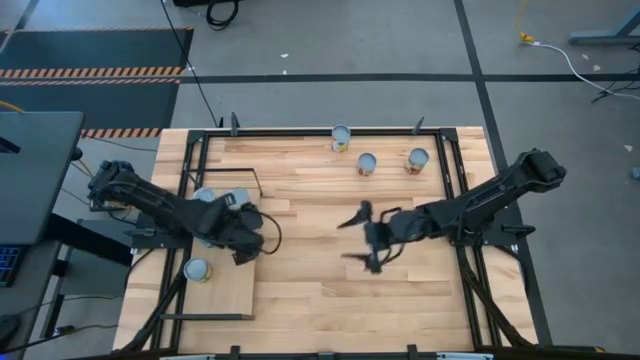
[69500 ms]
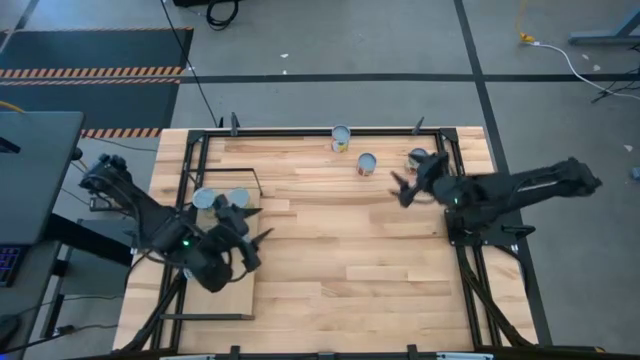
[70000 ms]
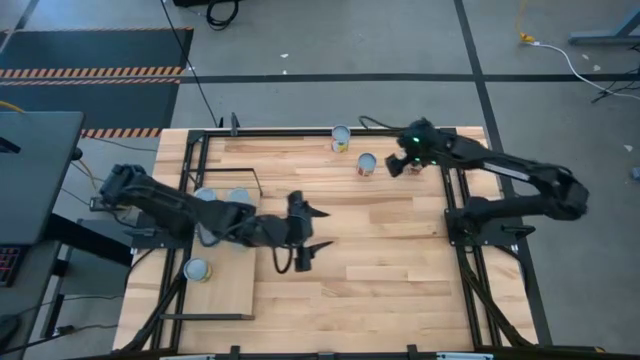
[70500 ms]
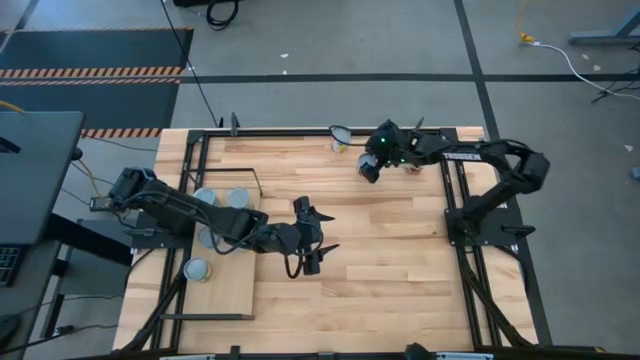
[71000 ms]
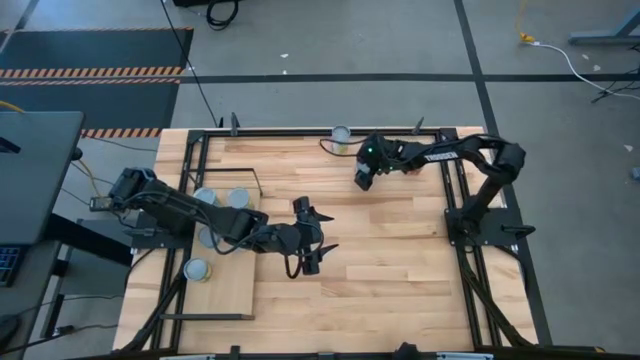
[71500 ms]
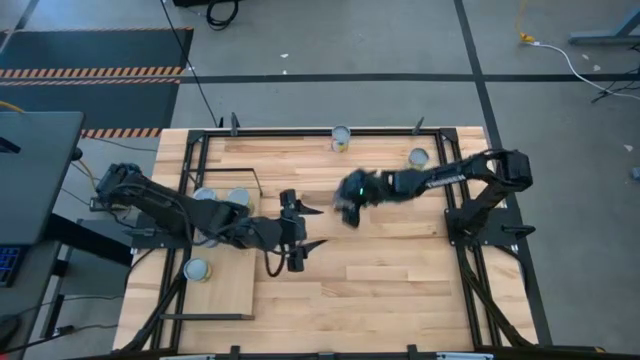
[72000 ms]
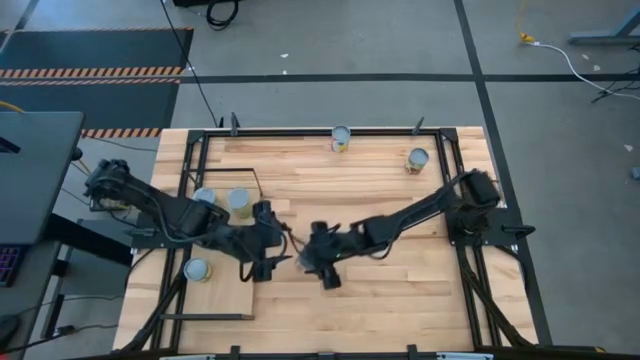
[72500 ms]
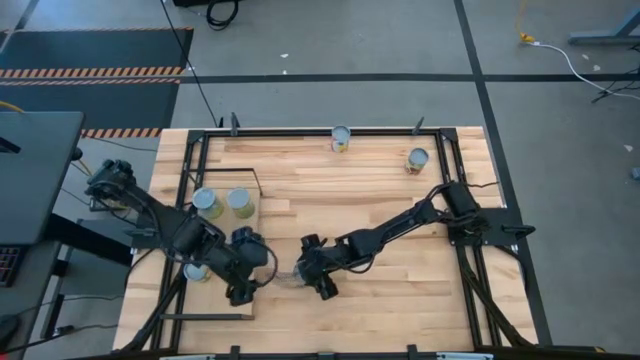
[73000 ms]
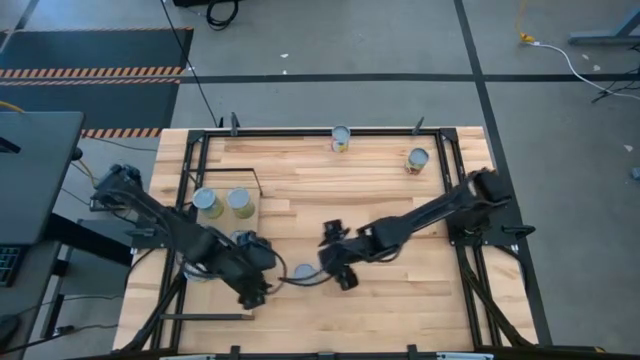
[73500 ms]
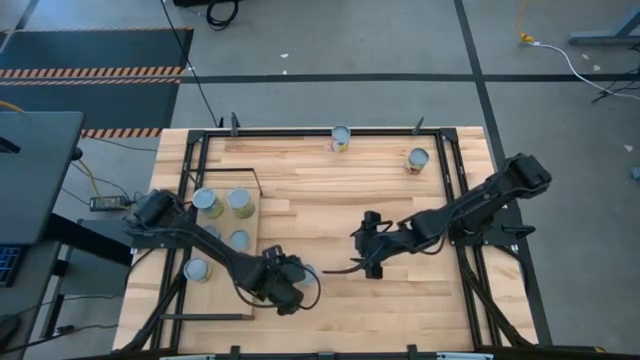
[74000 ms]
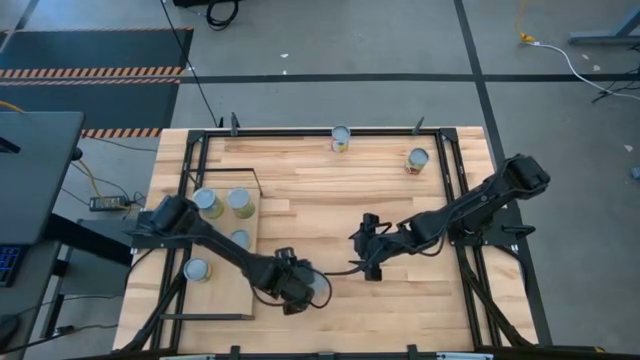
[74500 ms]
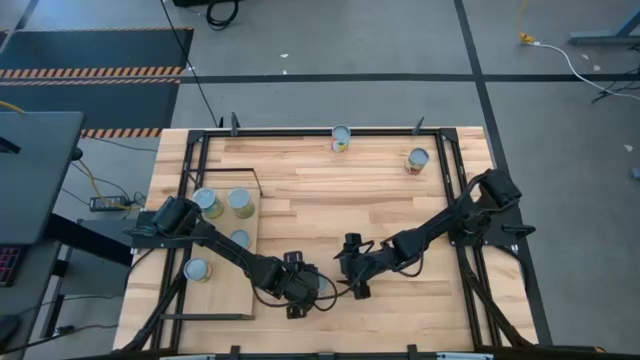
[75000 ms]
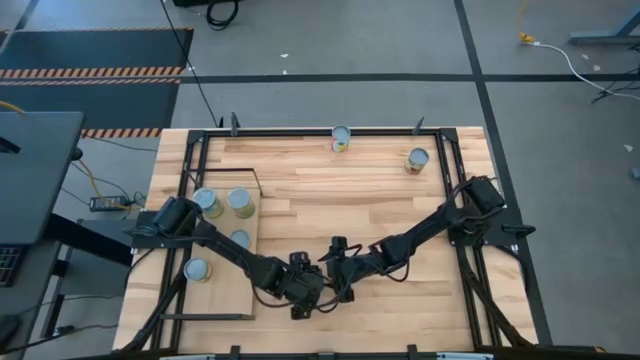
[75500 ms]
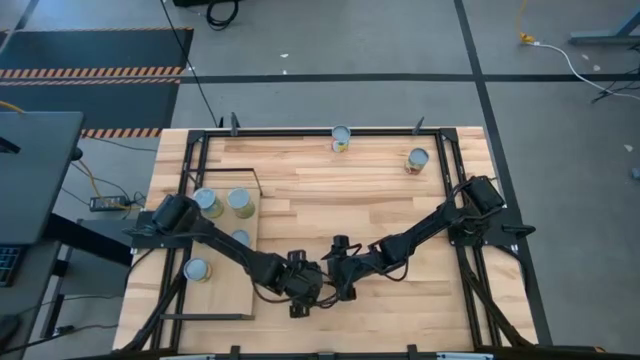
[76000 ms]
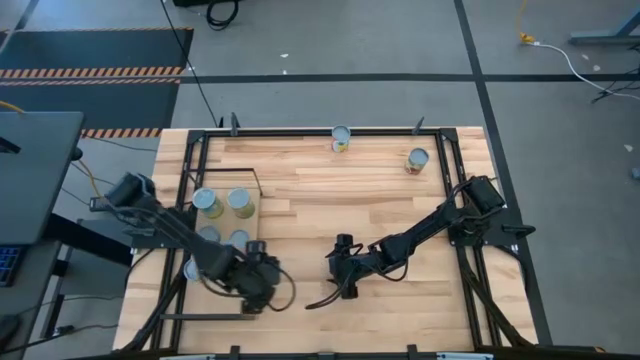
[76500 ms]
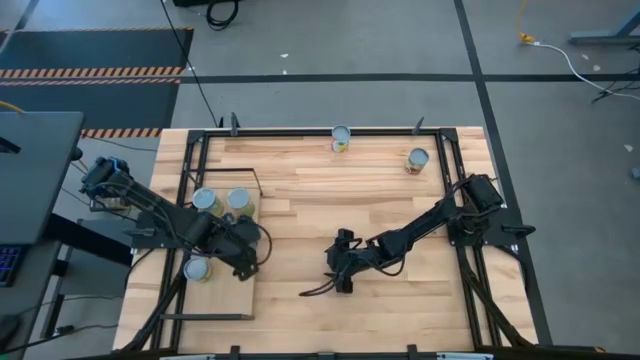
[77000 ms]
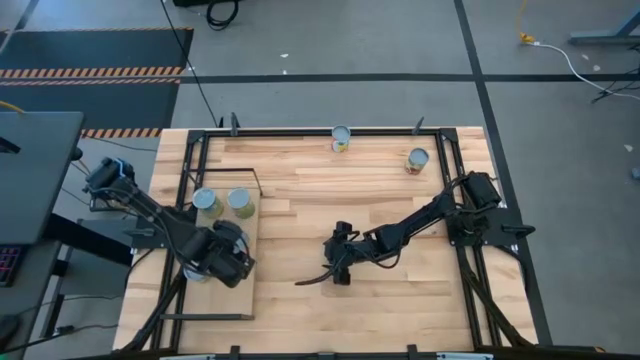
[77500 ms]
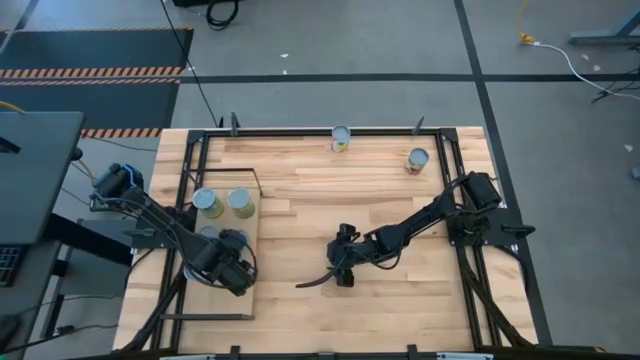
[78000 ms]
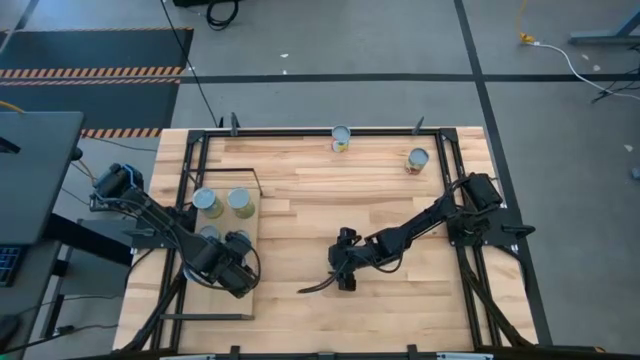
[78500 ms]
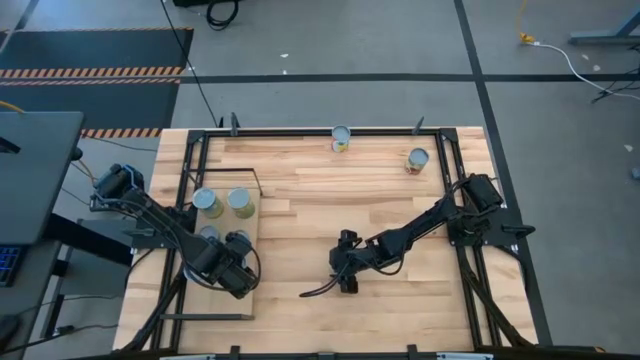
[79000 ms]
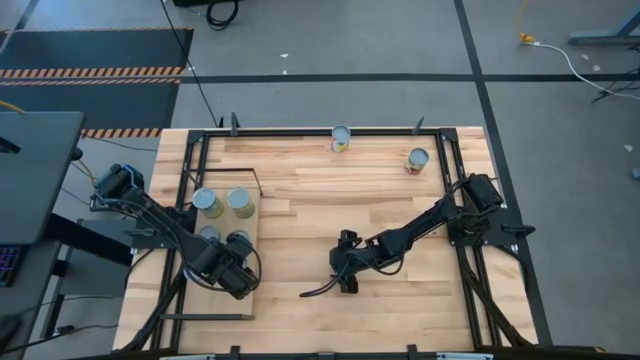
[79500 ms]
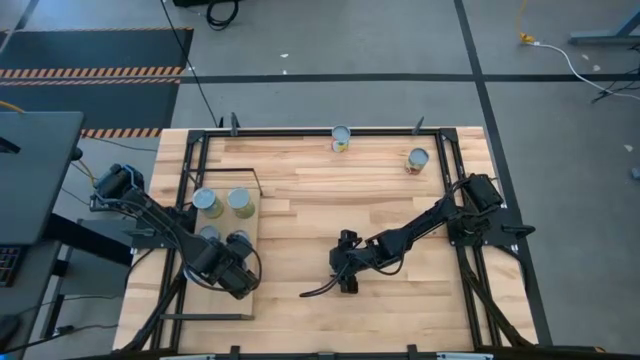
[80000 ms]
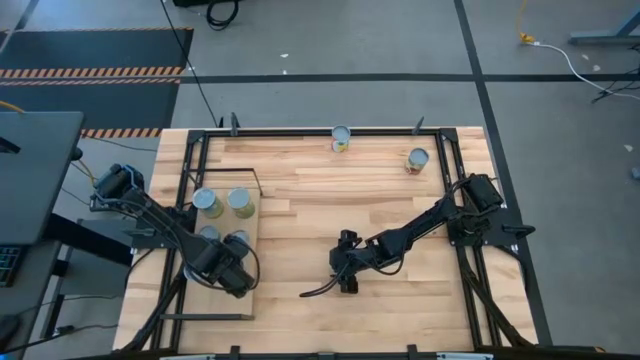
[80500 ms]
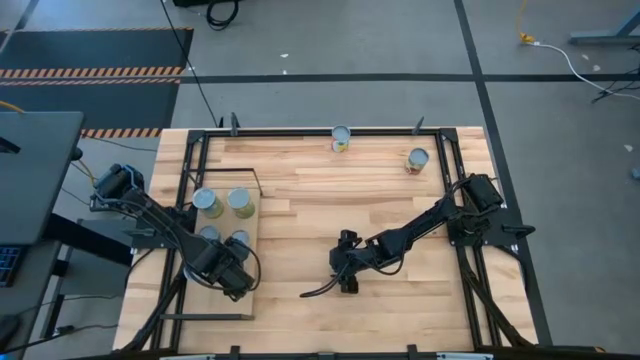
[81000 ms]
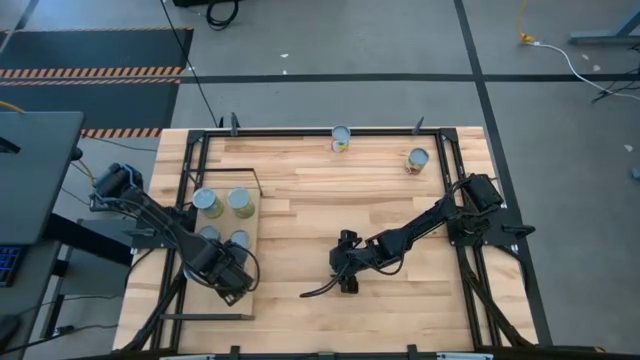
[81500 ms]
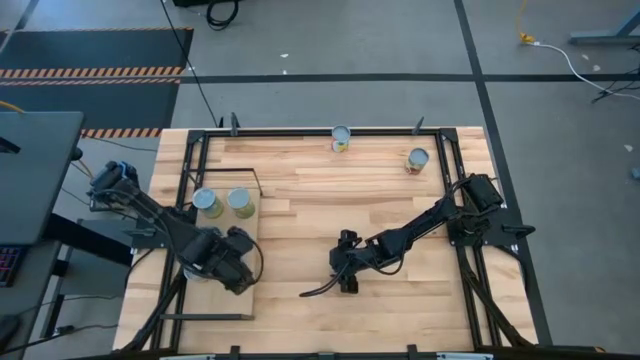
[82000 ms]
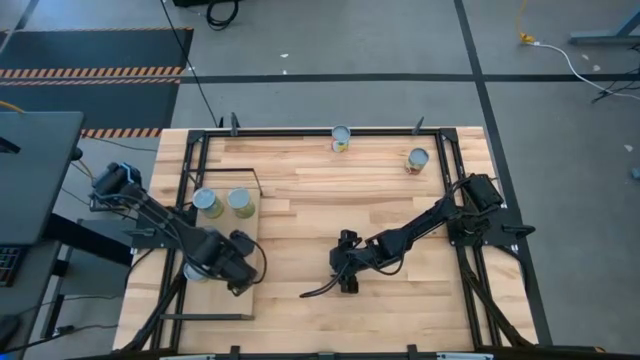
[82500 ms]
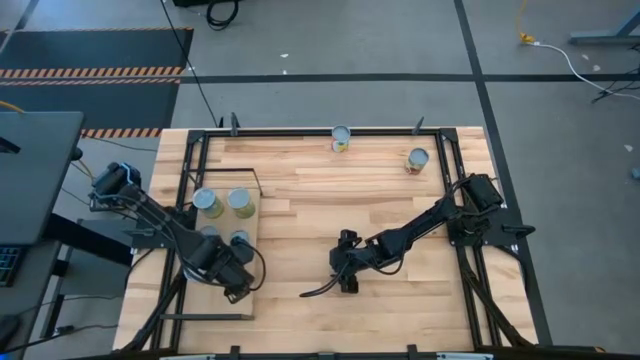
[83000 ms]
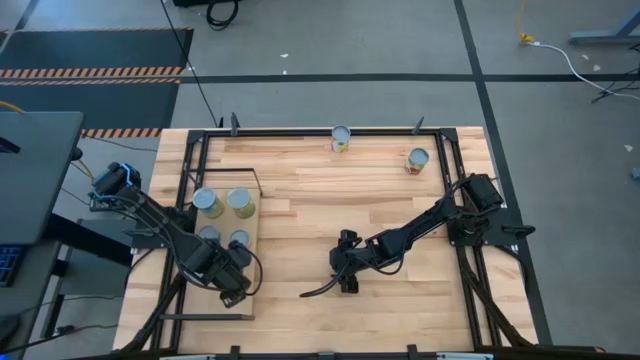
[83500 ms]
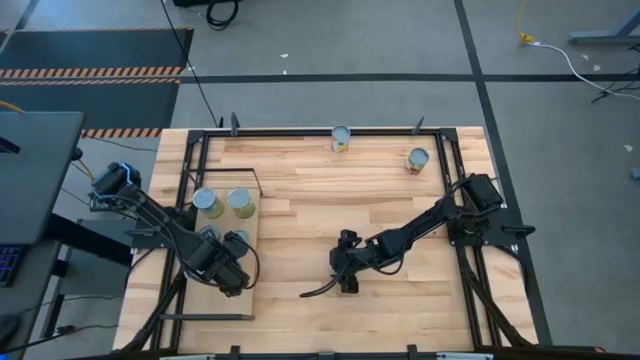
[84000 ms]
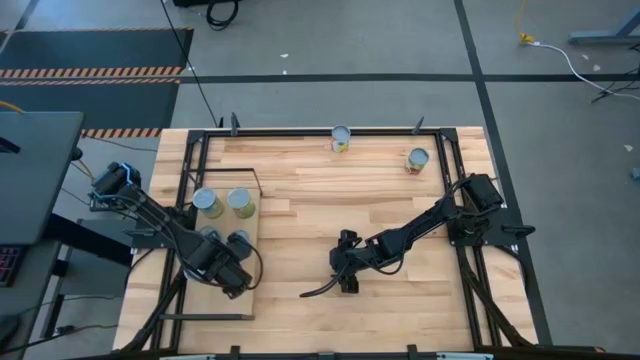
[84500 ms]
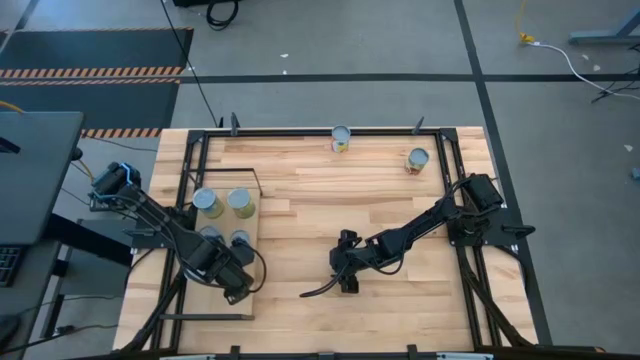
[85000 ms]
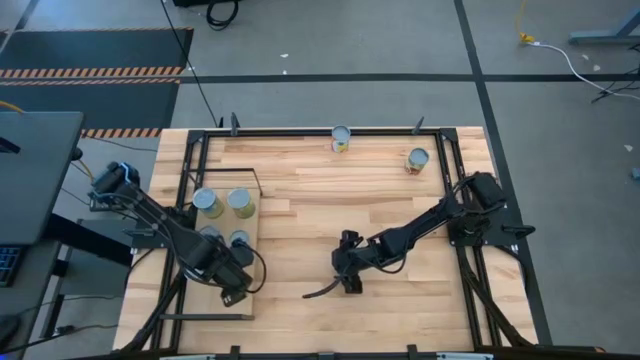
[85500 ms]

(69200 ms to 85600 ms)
Task: Pick and place cans onto a shelf
Put the canned tomatoes on the shelf

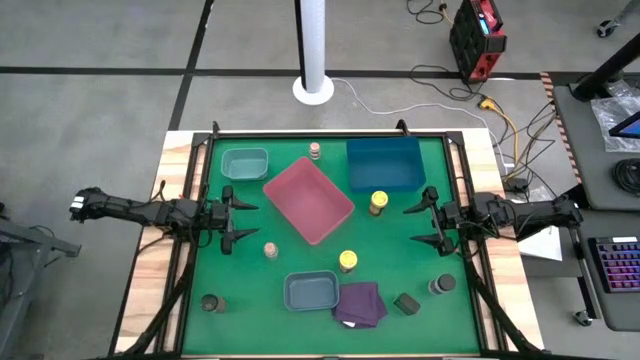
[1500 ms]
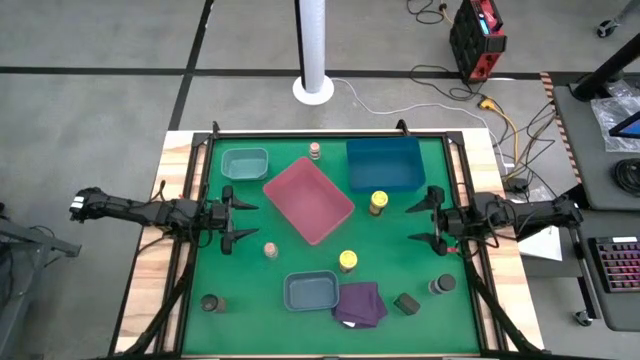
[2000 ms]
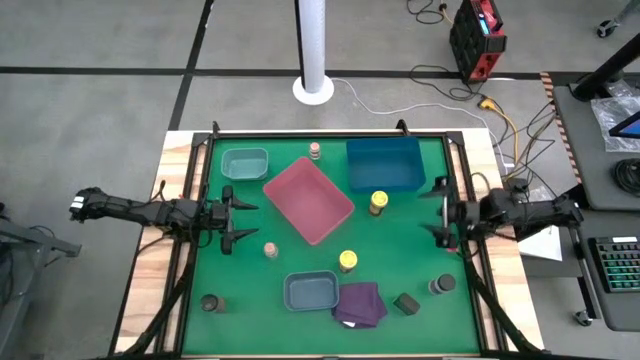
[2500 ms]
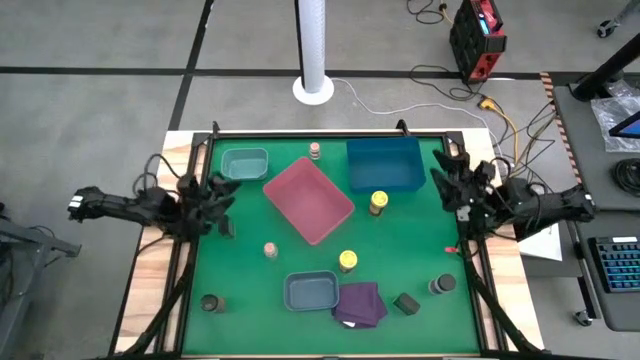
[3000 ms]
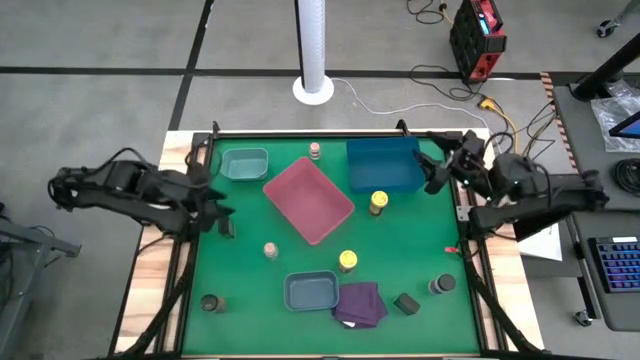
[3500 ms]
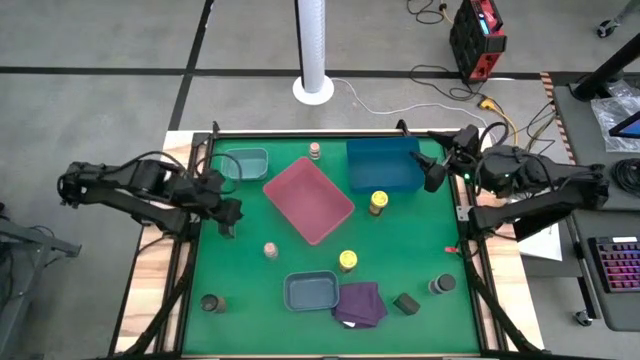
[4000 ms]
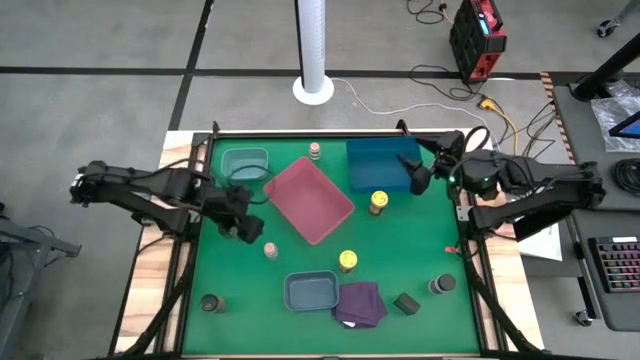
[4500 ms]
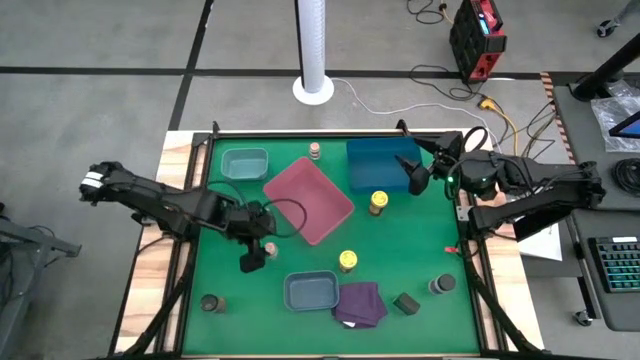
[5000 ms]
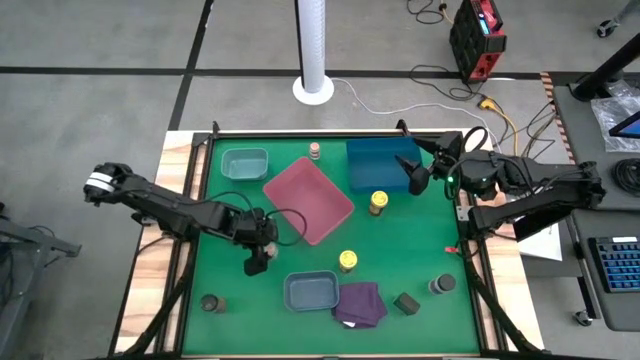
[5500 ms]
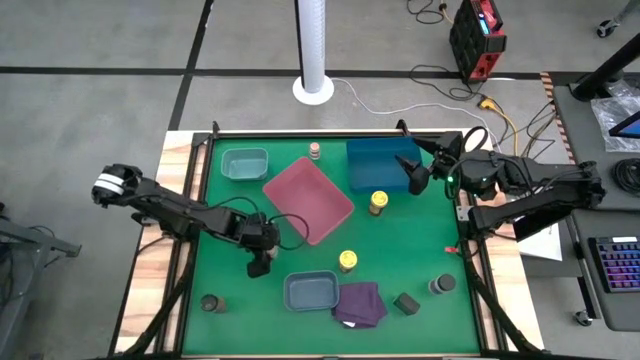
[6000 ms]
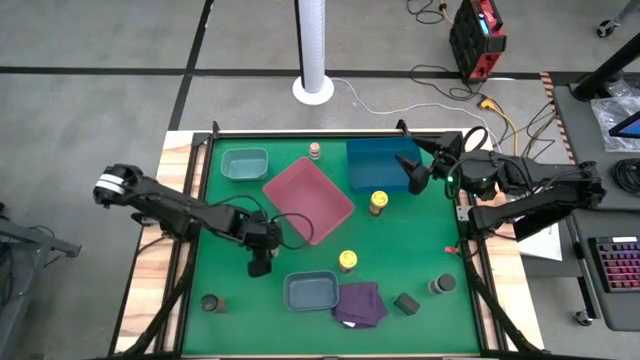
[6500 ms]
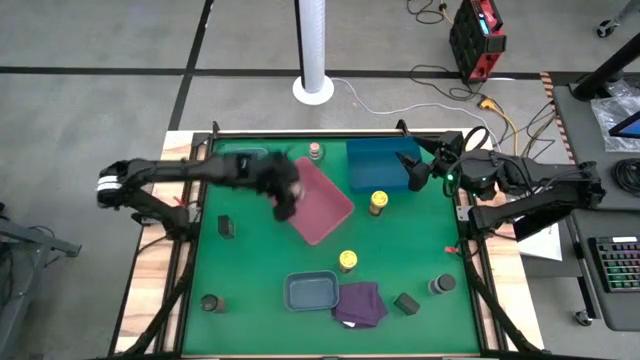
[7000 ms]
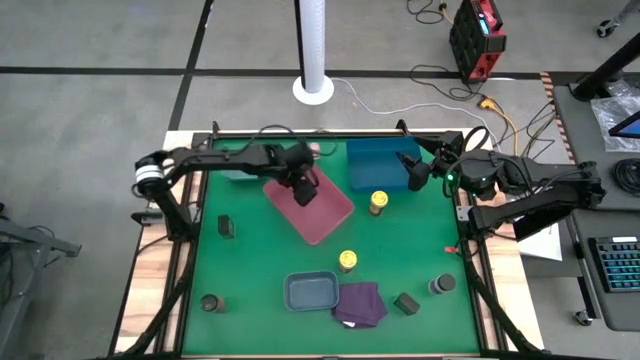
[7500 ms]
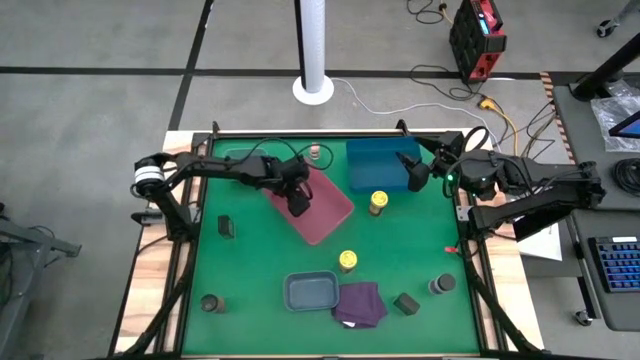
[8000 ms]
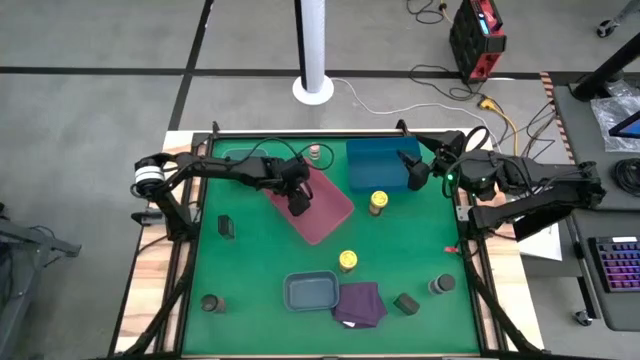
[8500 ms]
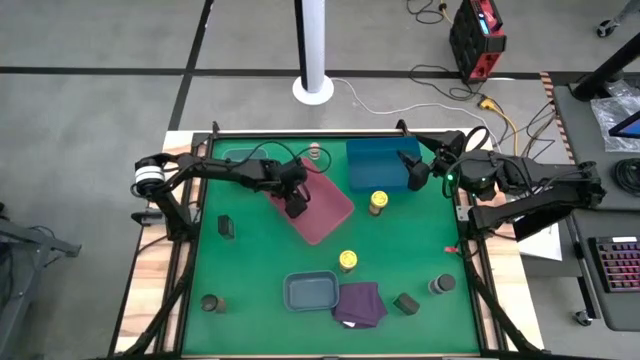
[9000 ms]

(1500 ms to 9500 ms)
Task: Sort spices by type
Put the bottom transparent seasoning bottle into the pink bin
